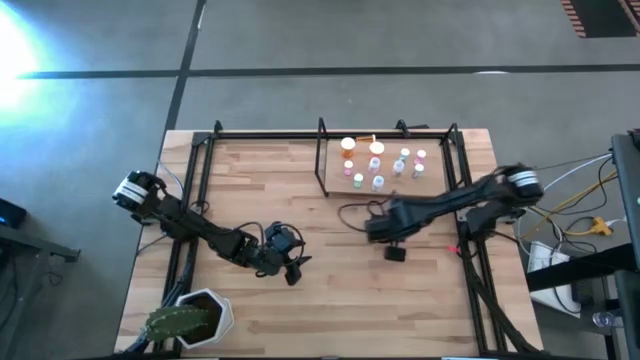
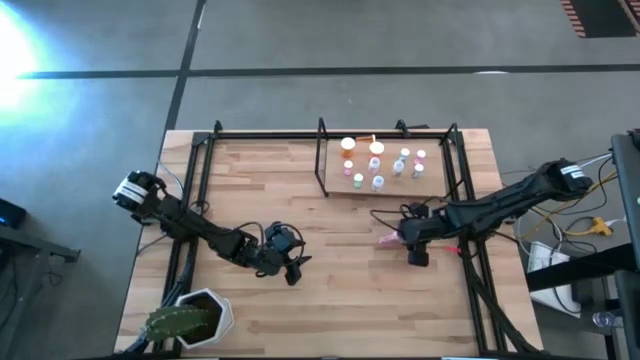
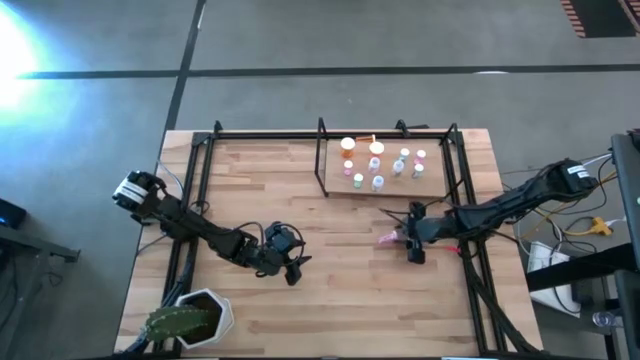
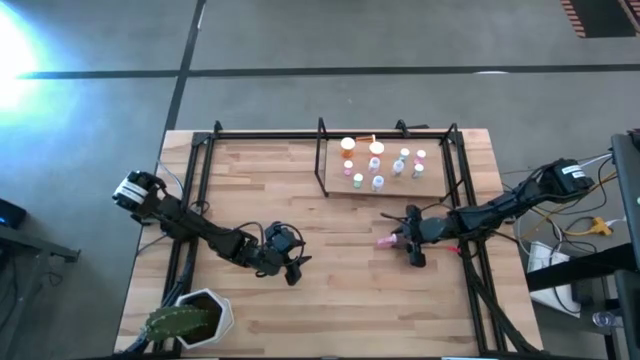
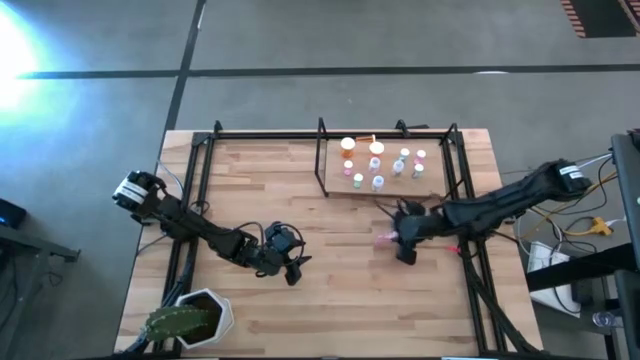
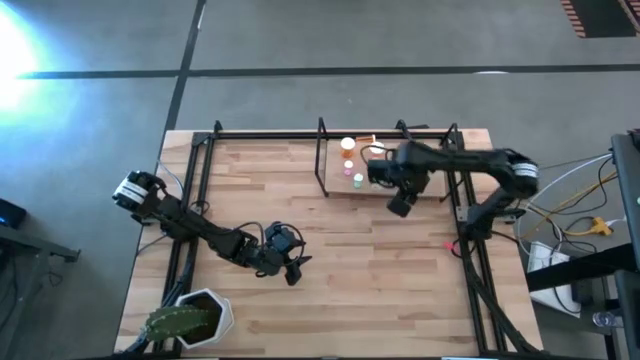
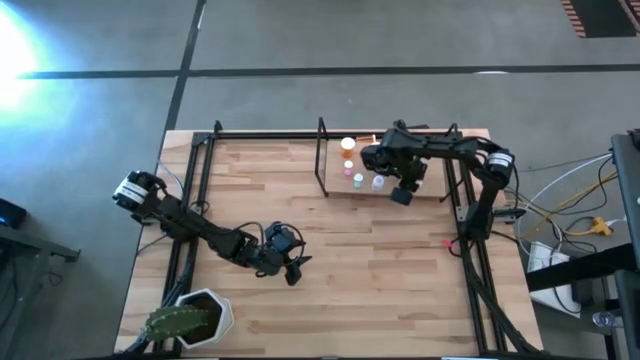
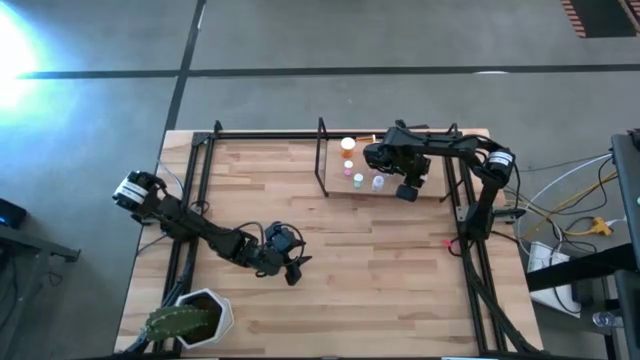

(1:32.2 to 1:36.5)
Task: Pick and place medicine bottles onto shelf by color
Put the pink pill bottle on the shelf

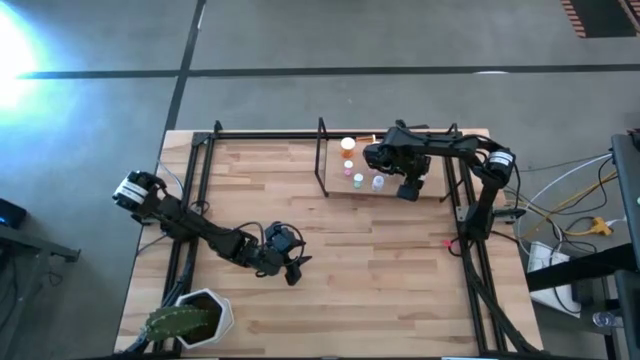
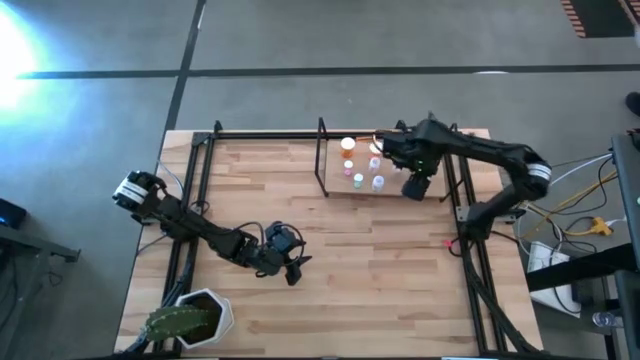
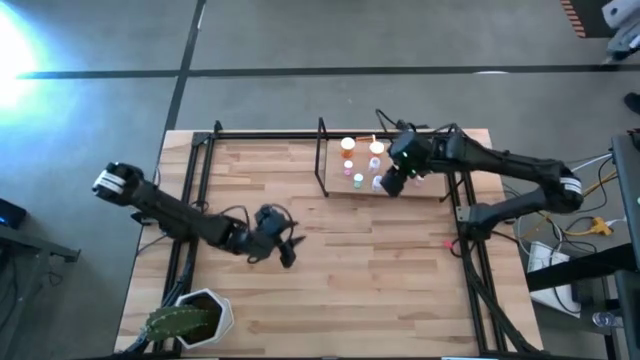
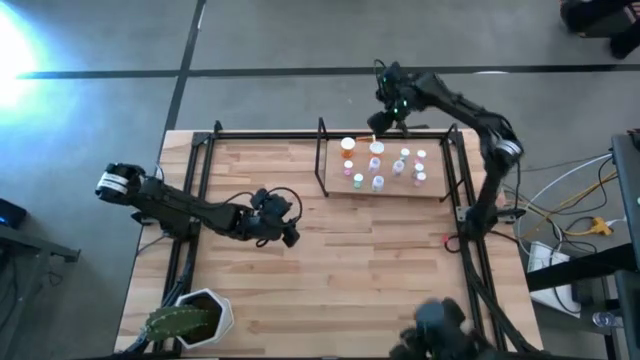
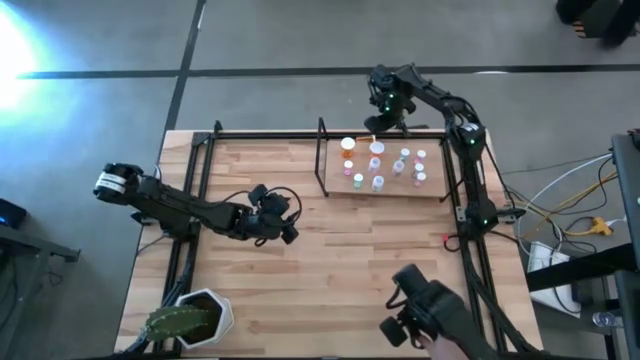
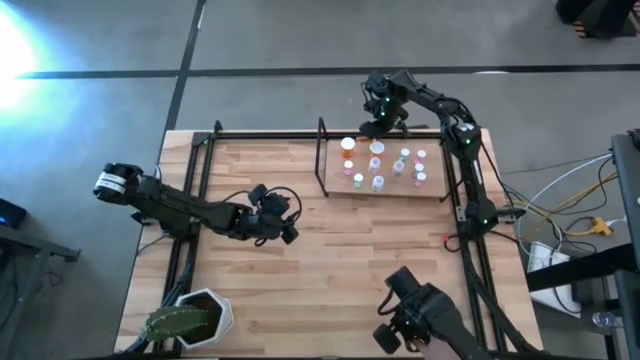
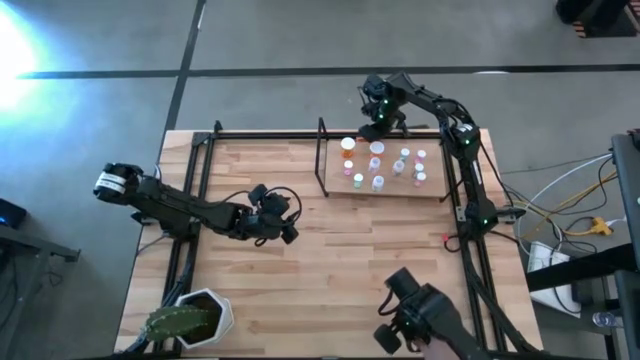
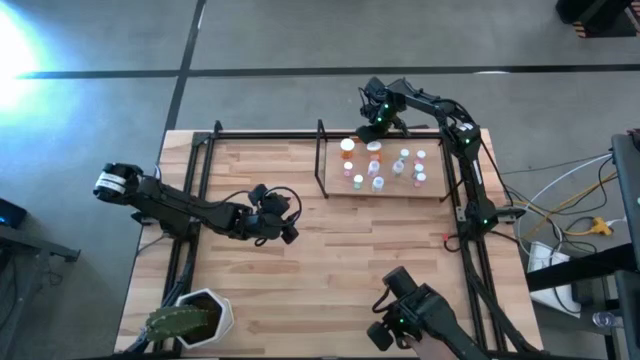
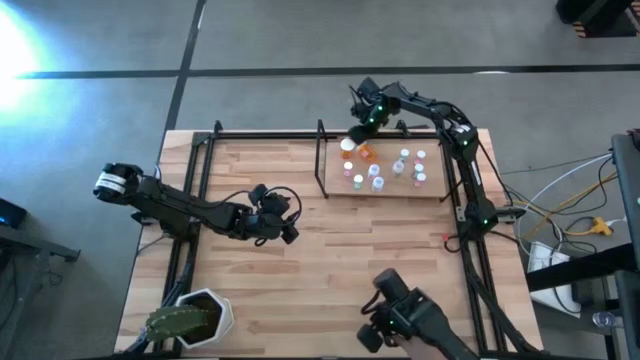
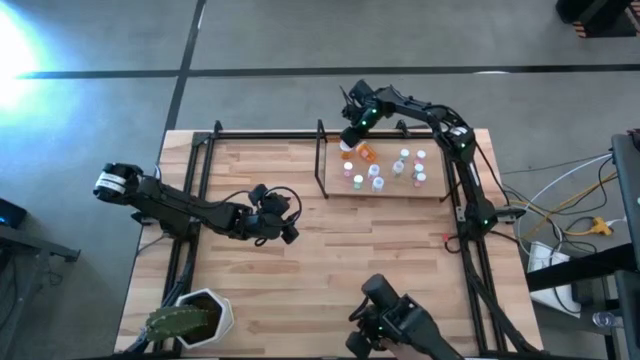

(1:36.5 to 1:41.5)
Adjust the orange pill bottle on the table

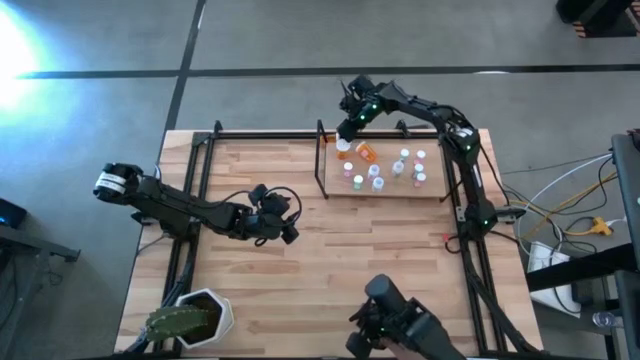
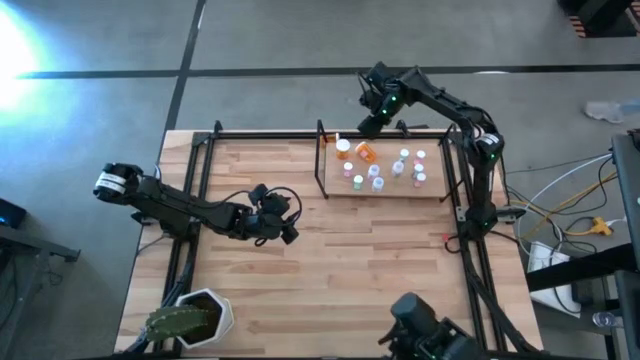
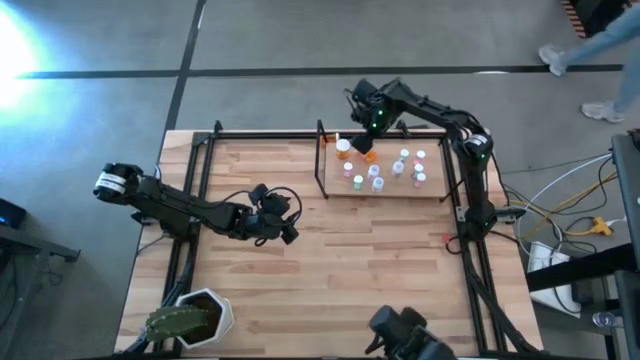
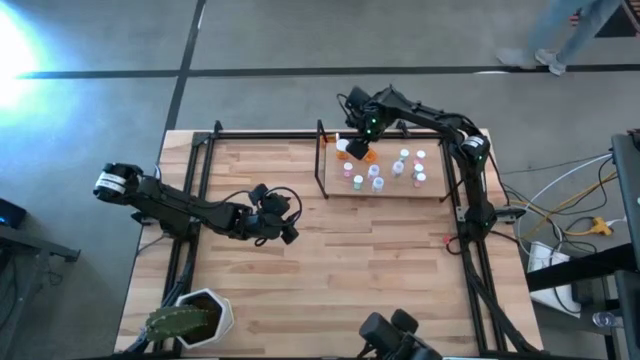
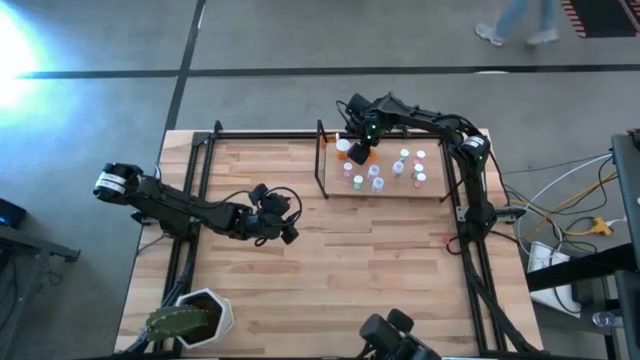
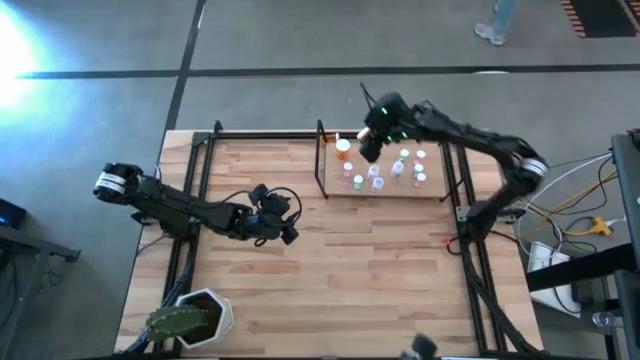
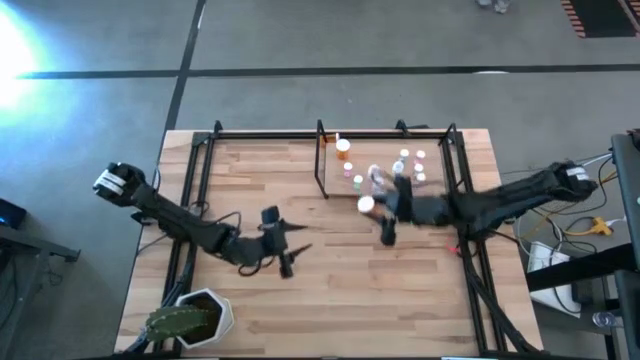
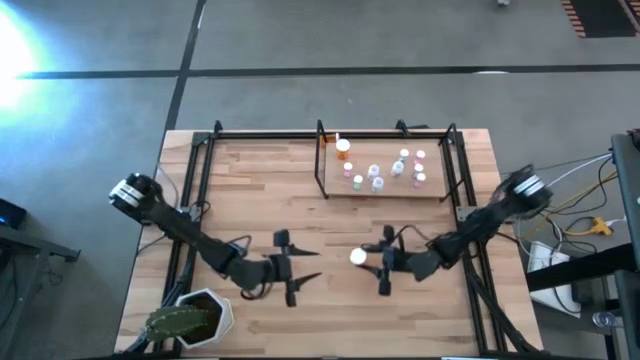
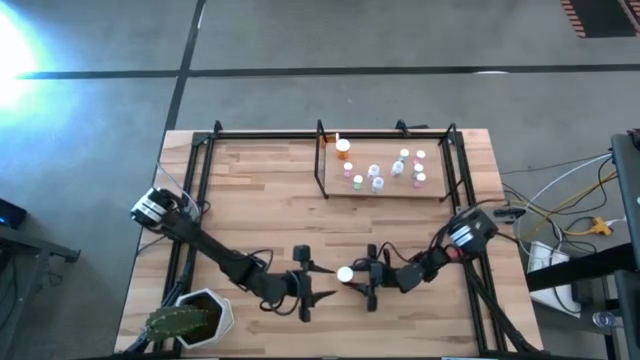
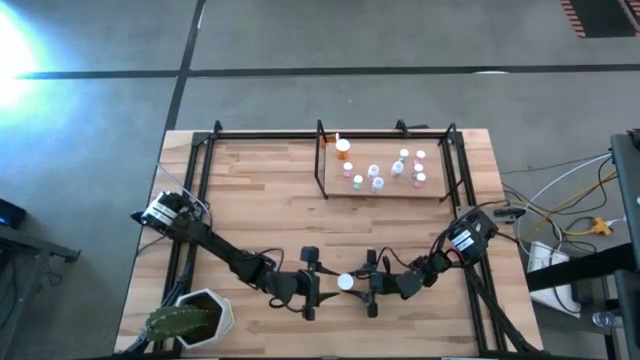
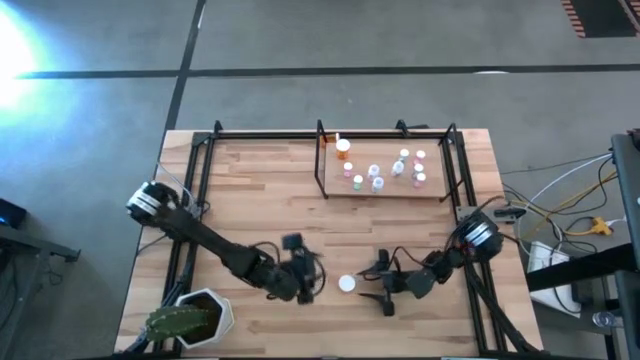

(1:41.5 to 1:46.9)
Remove the orange pill bottle from the shelf

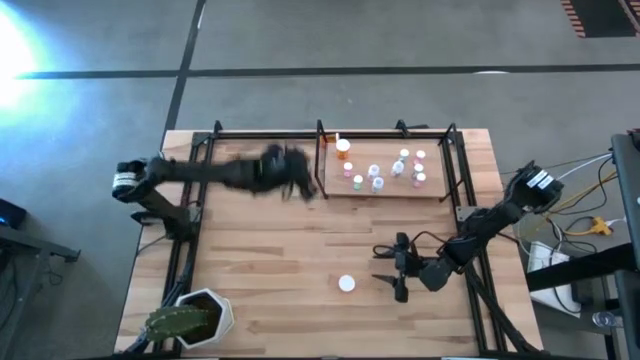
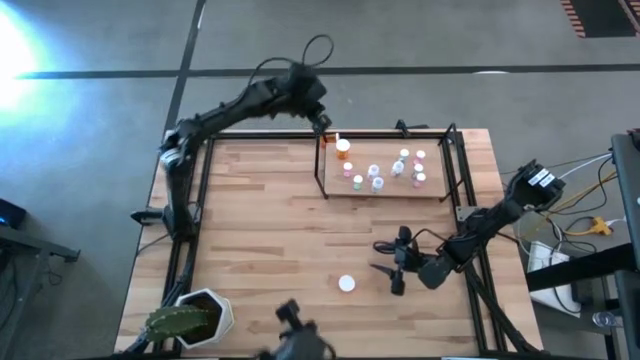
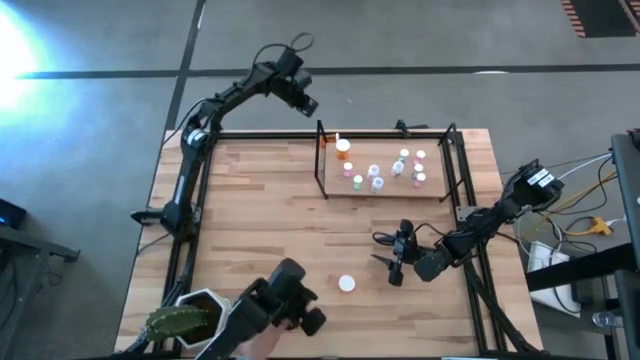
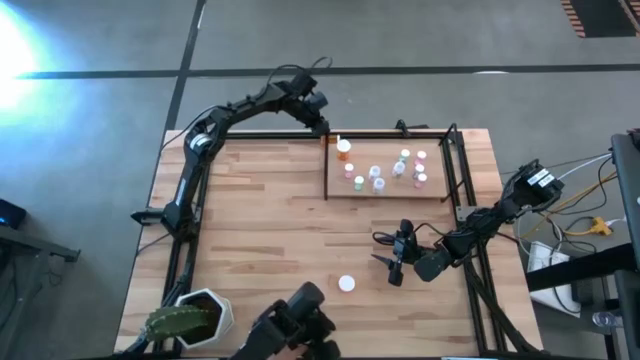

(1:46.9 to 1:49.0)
Adjust the shelf on the table

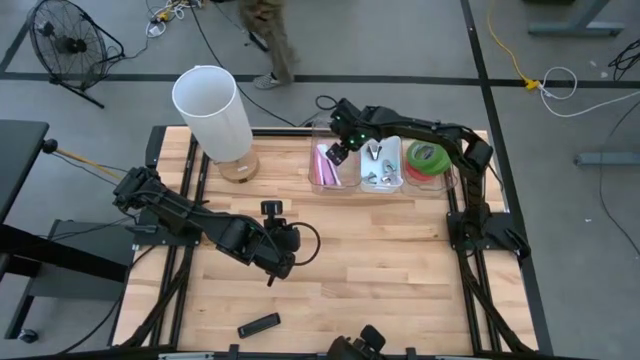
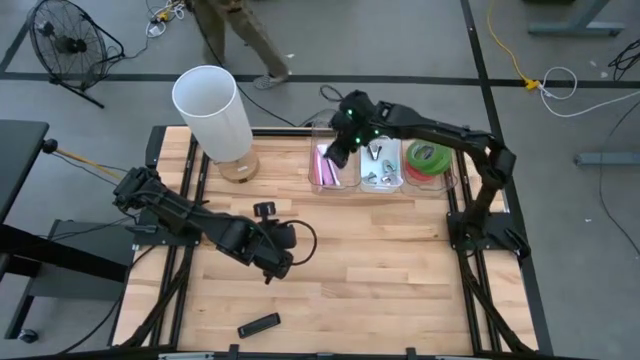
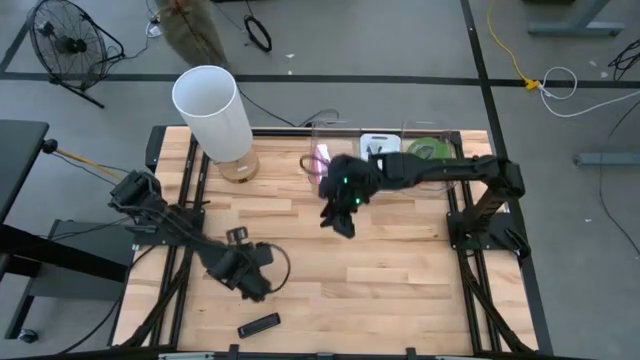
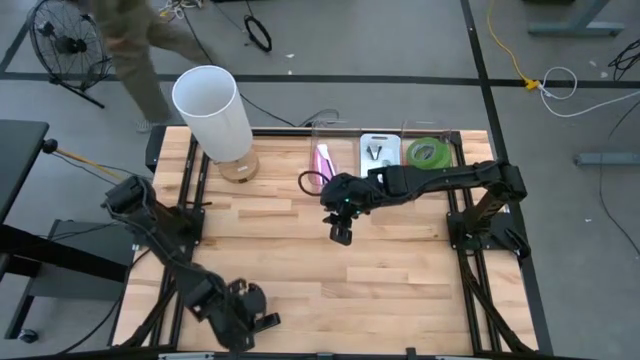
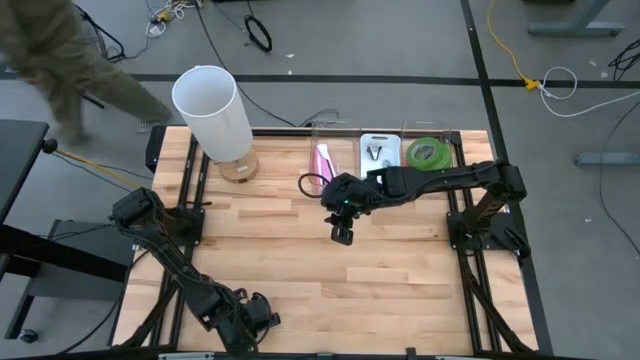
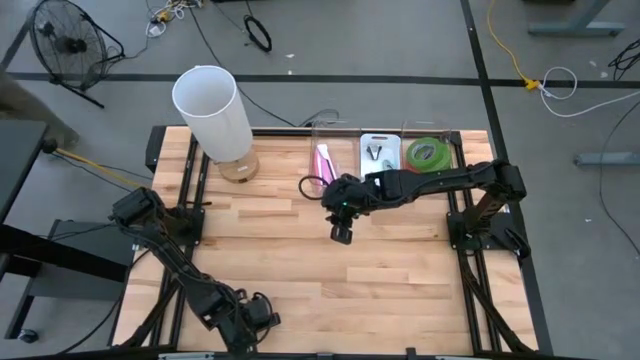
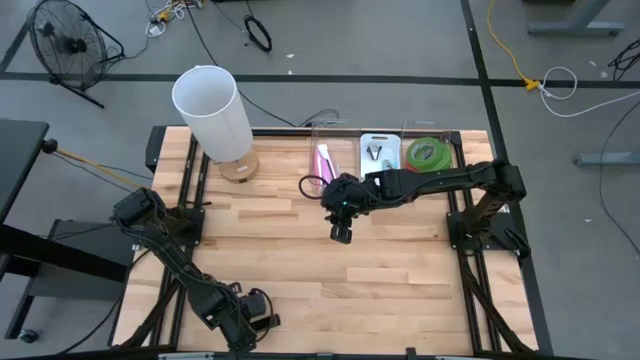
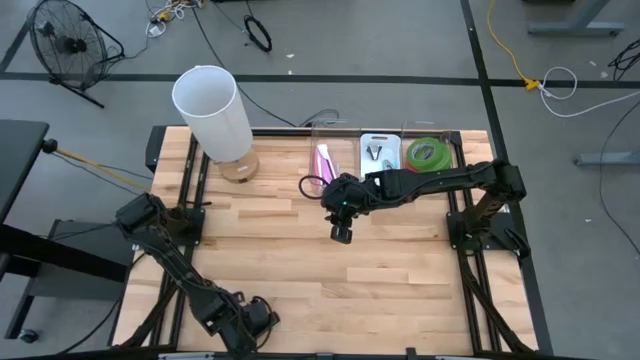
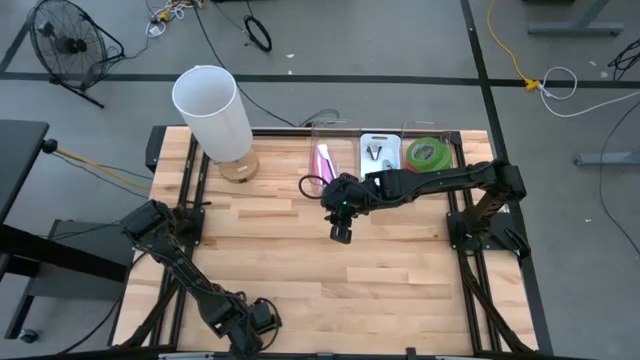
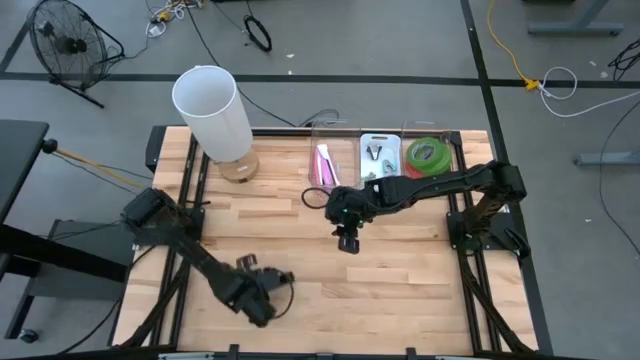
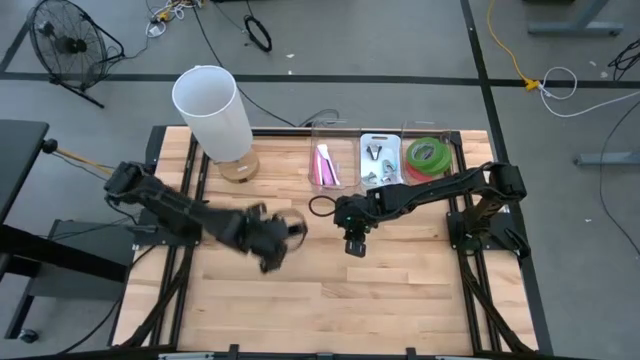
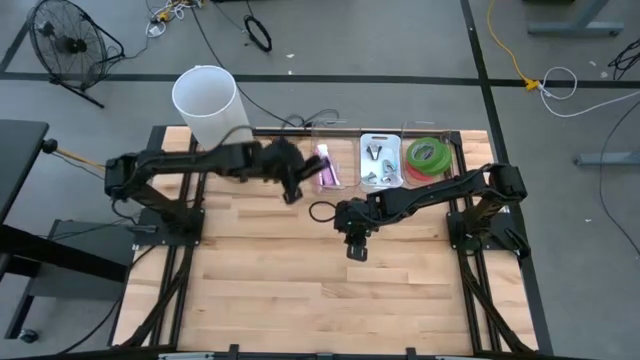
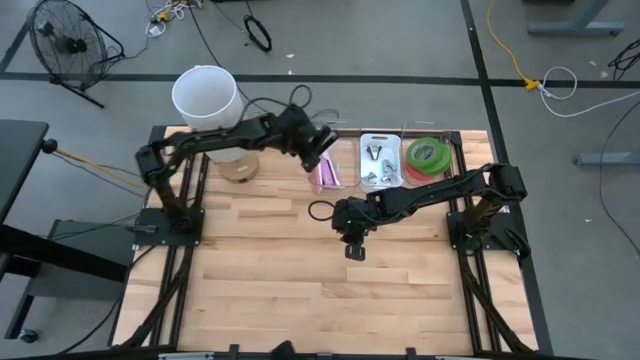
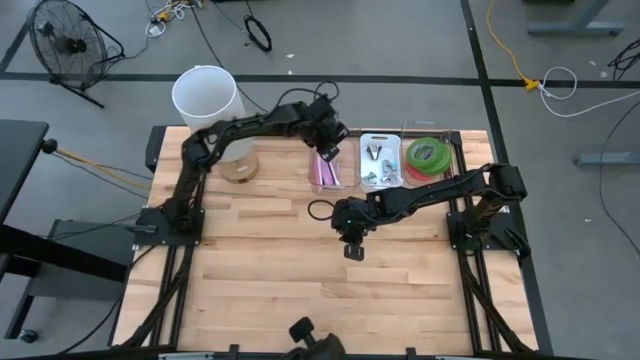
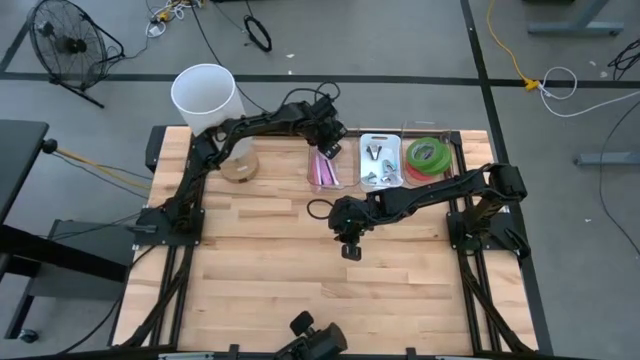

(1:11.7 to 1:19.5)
Task: Pick and place Stapler, Stapler remover, tape
Put the black stapler into the left transparent bin
